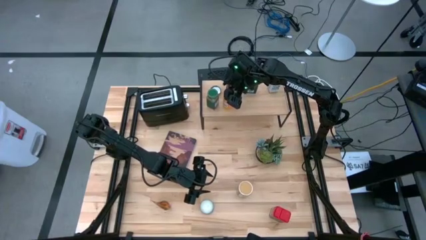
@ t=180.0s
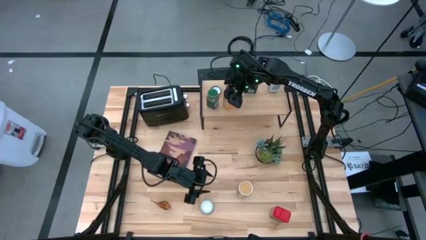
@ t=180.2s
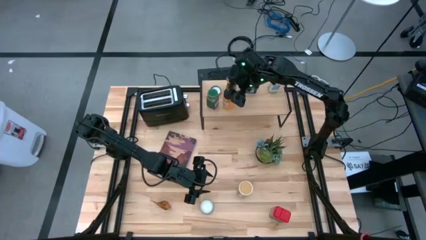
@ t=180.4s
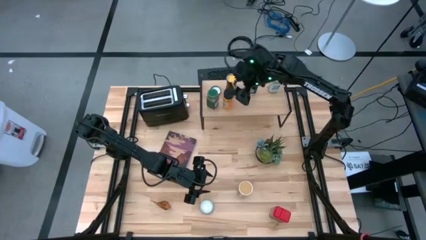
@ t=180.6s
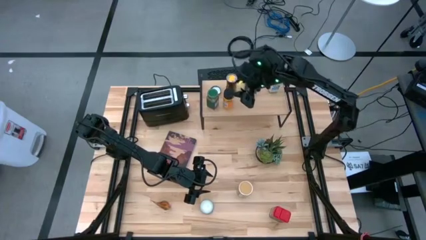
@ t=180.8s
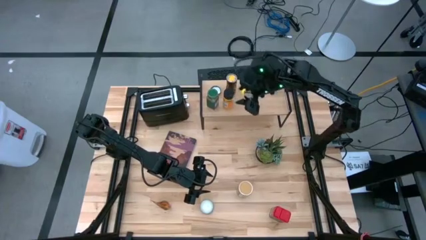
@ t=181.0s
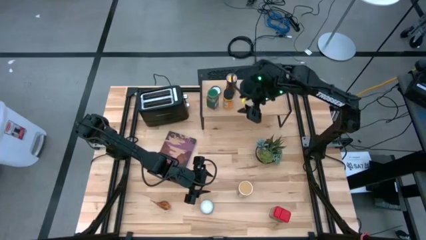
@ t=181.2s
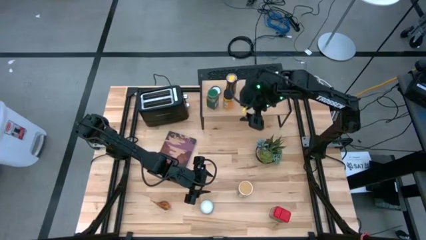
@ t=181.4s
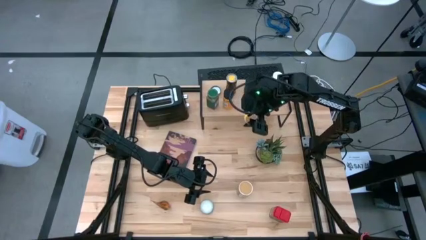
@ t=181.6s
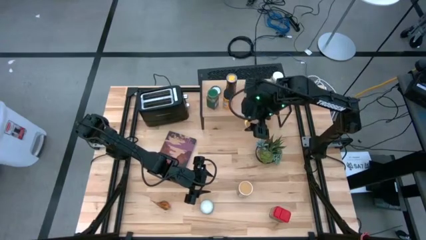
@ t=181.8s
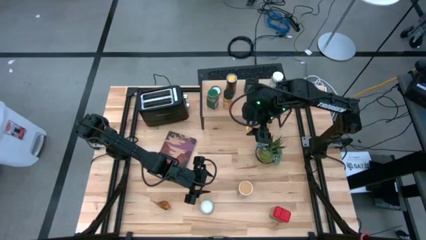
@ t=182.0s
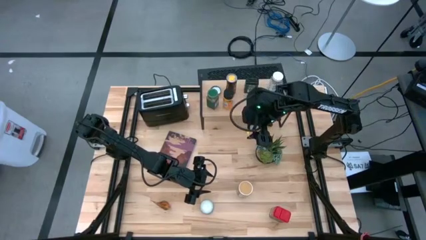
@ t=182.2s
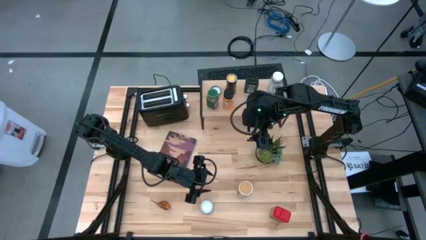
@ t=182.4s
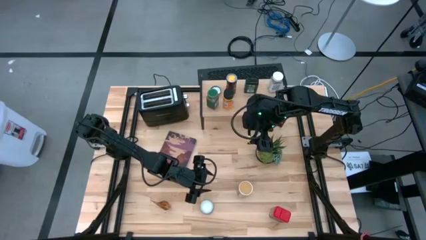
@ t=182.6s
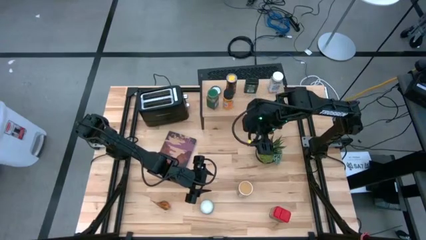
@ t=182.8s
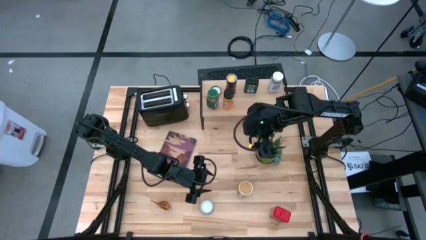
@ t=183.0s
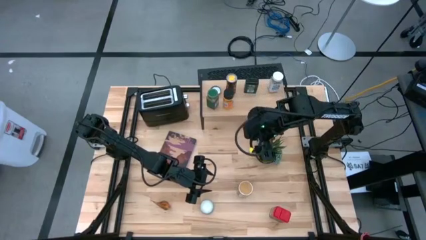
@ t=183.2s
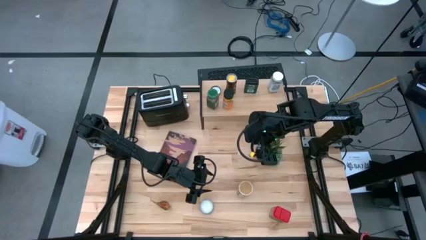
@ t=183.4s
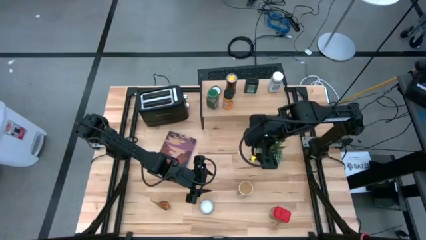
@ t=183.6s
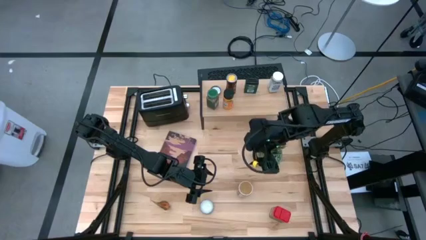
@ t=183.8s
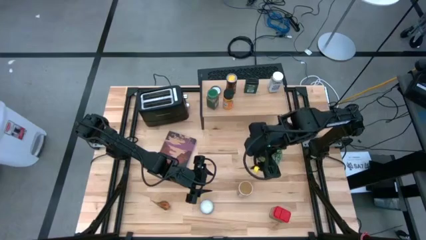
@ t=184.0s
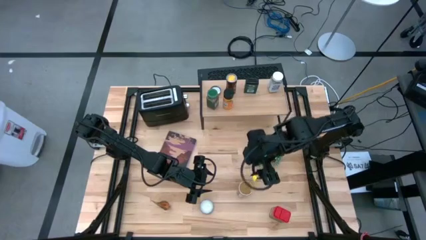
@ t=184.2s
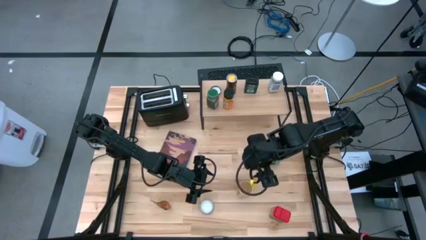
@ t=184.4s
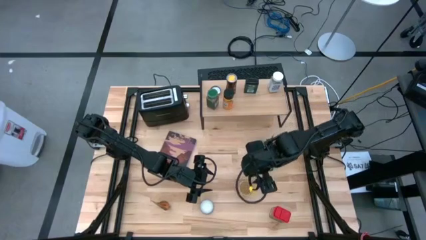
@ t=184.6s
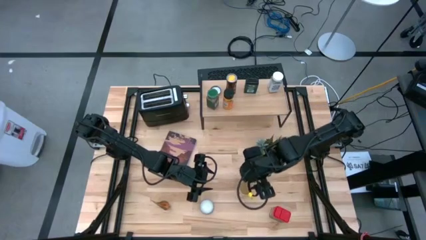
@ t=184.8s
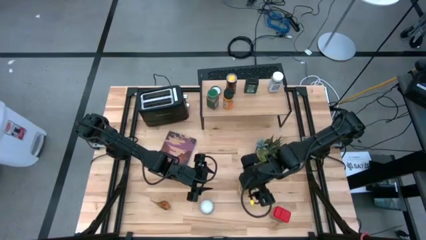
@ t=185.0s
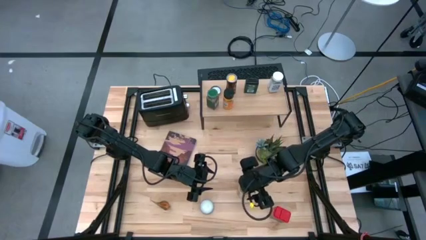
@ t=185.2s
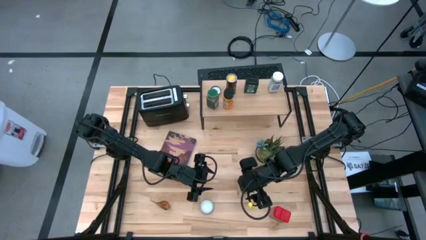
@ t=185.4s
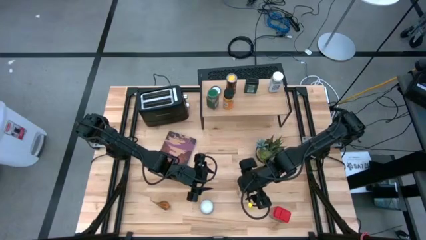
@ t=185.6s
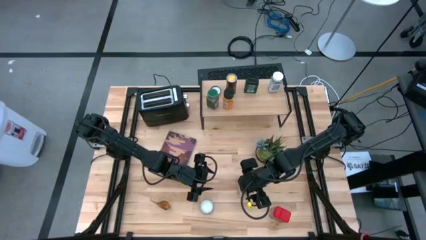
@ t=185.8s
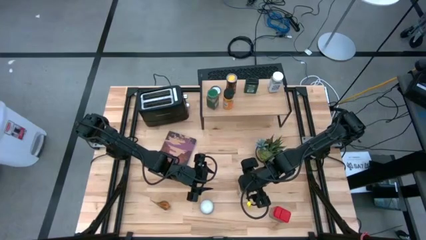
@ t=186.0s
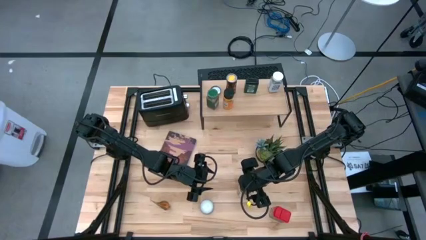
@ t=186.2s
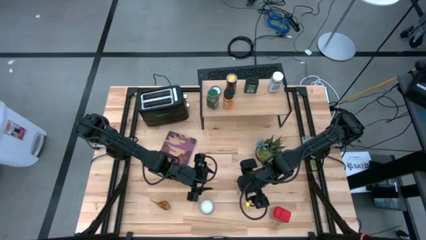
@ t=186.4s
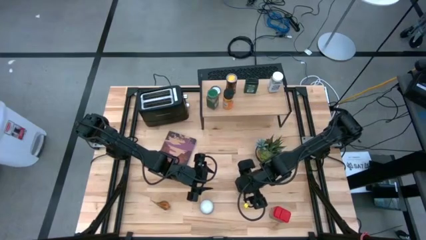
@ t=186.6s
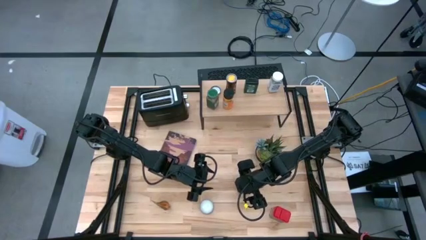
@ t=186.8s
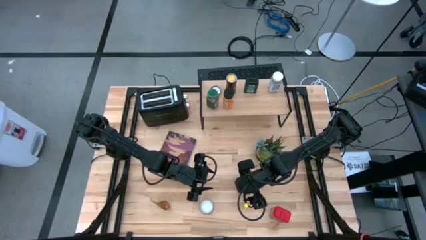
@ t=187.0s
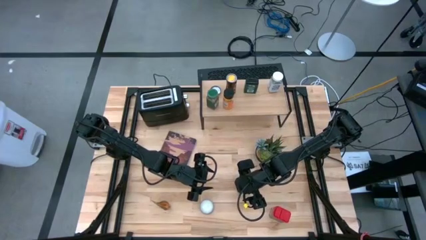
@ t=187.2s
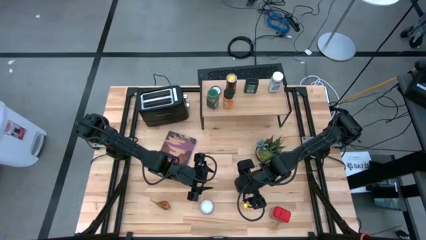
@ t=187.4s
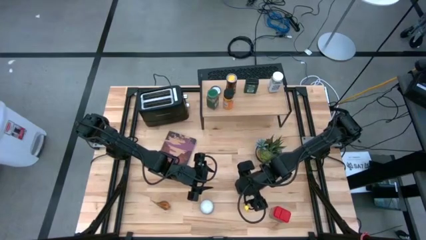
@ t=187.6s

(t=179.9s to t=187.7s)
Task: Shelf spices
Put the gold seasoning bottle on the shelf

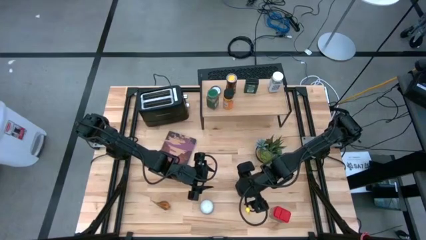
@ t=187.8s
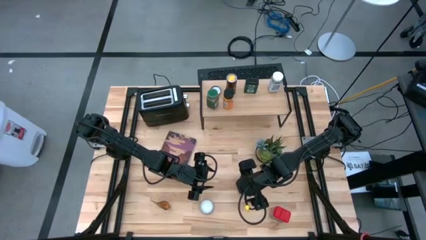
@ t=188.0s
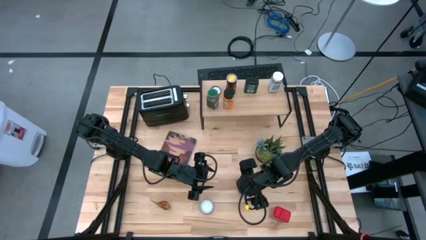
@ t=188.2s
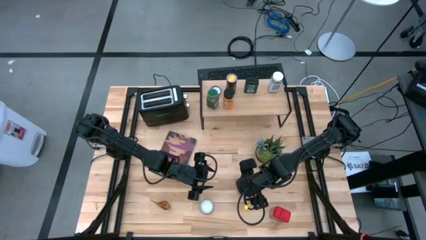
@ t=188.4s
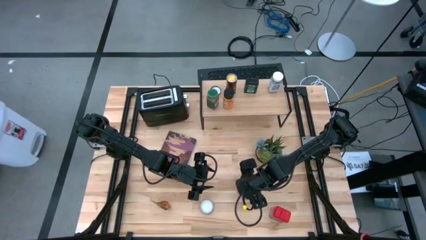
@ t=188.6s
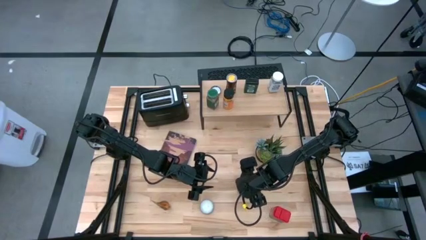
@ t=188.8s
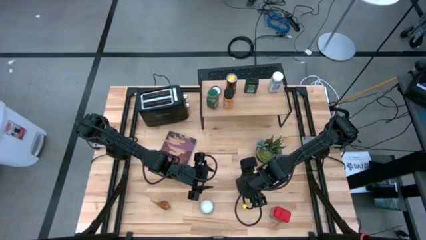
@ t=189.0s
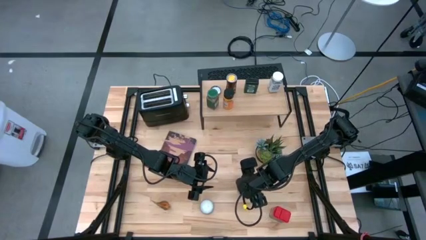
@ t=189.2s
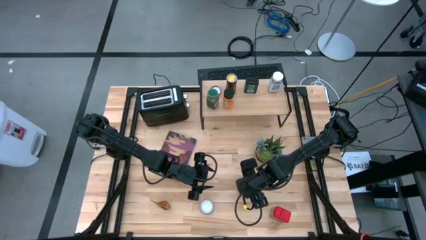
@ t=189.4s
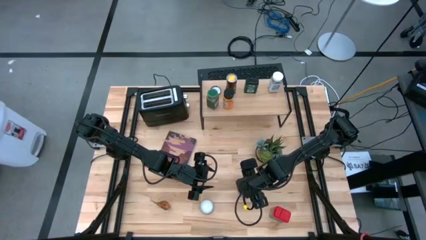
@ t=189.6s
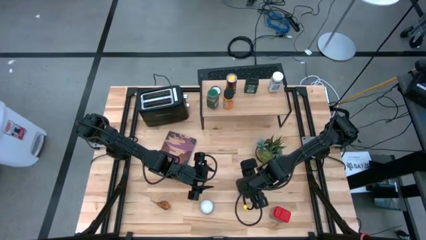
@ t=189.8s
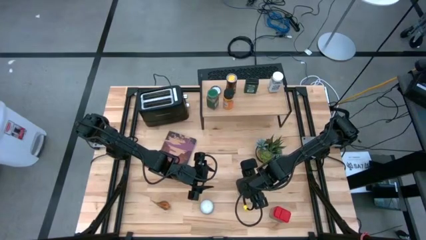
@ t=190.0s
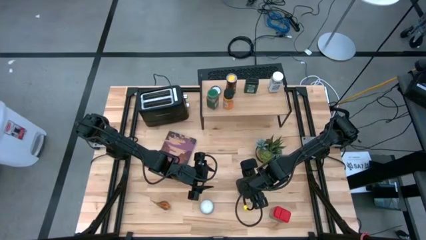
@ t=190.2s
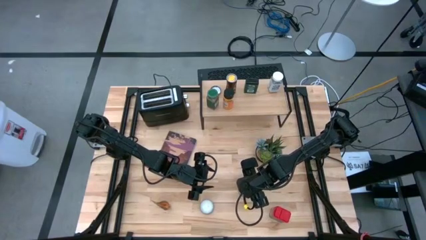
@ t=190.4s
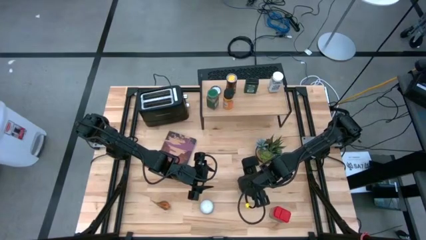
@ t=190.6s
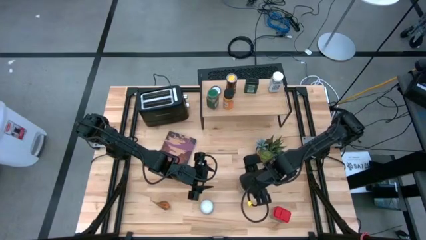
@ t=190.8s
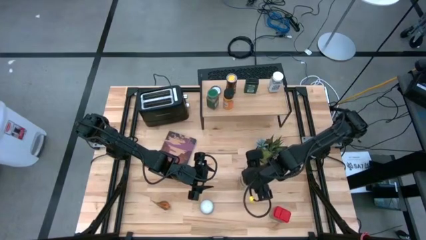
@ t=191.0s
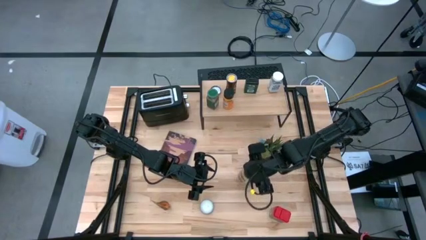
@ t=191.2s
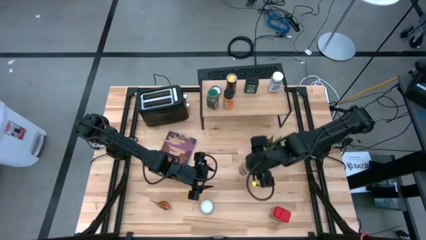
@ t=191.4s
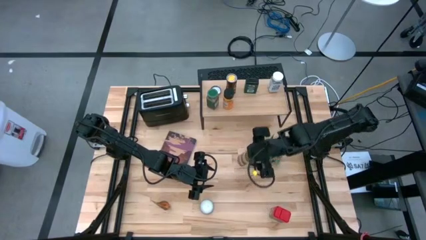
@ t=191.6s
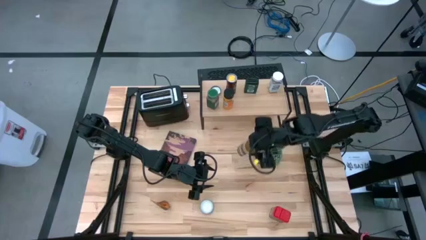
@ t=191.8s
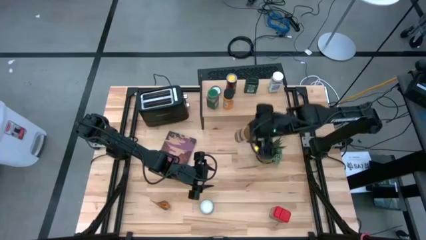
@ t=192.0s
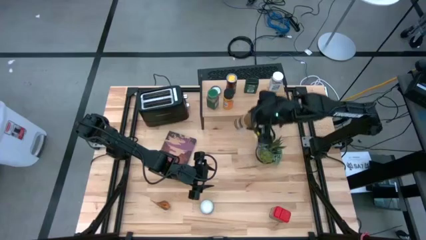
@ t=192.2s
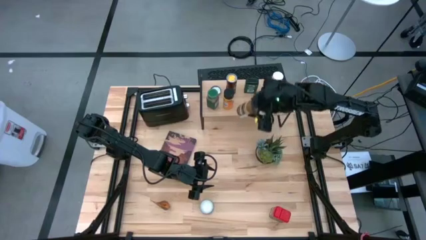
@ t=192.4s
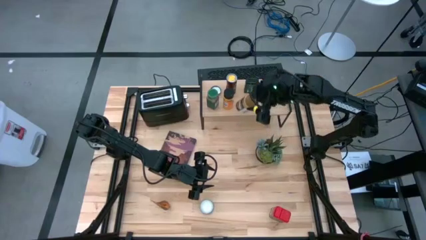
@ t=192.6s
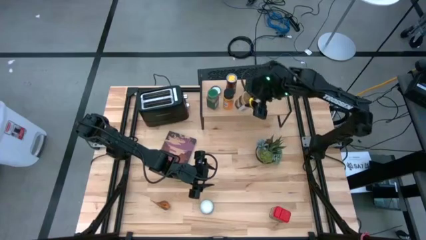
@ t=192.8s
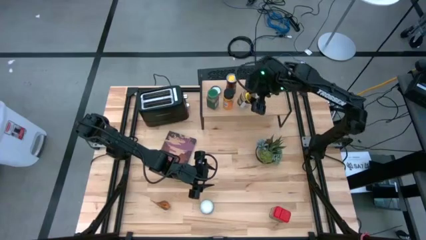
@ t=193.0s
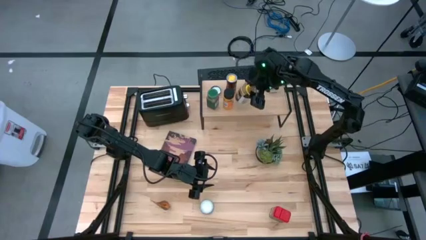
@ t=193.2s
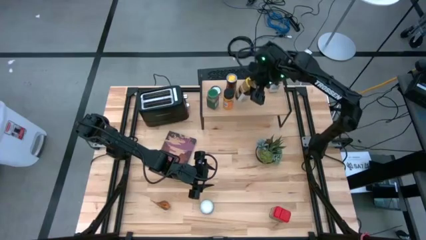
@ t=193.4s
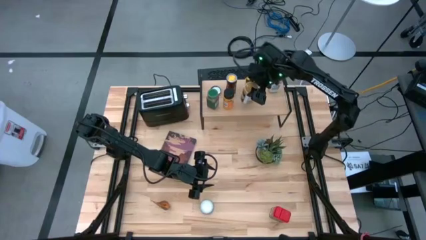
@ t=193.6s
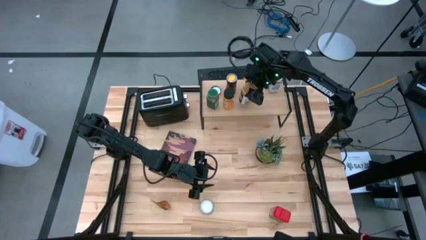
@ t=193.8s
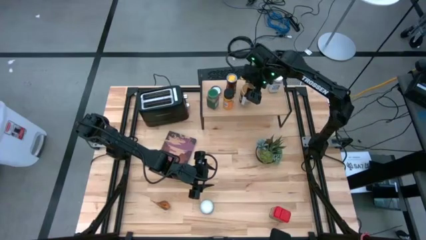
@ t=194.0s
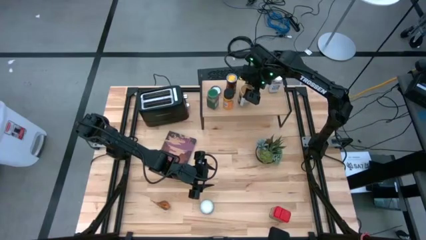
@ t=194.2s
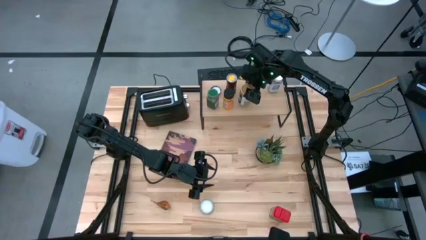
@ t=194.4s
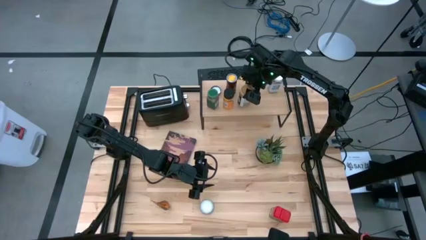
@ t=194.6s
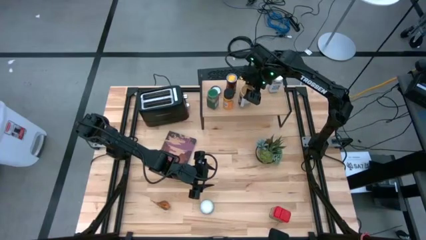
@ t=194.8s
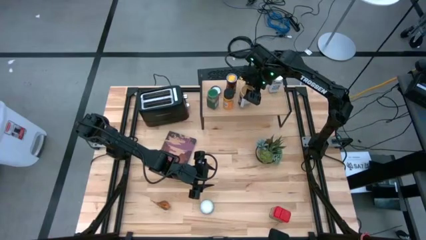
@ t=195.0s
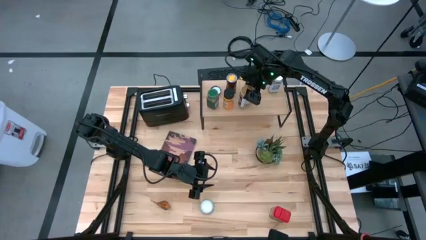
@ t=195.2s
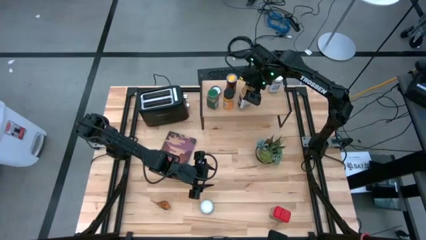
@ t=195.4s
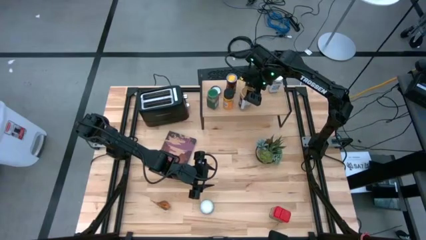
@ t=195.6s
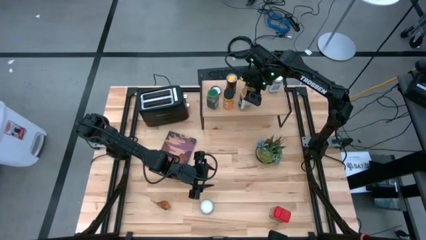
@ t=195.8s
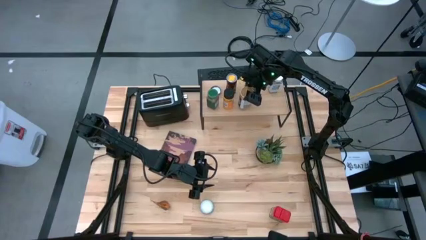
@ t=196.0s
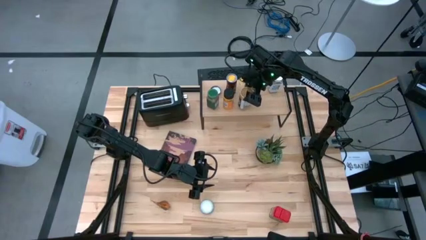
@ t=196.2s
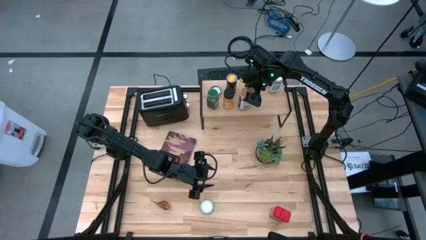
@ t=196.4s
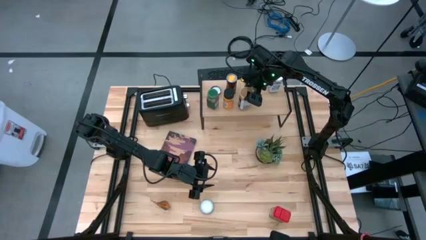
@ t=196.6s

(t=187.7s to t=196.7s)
Put the gold seasoning bottle on the shelf
